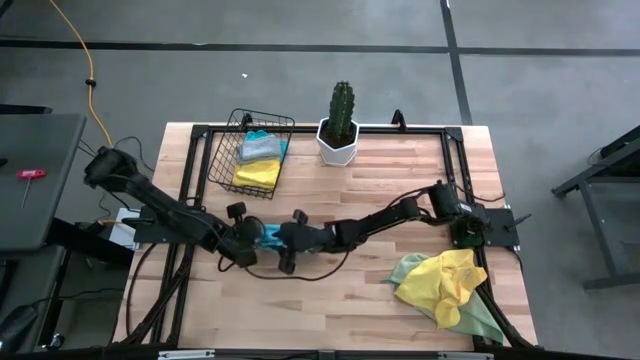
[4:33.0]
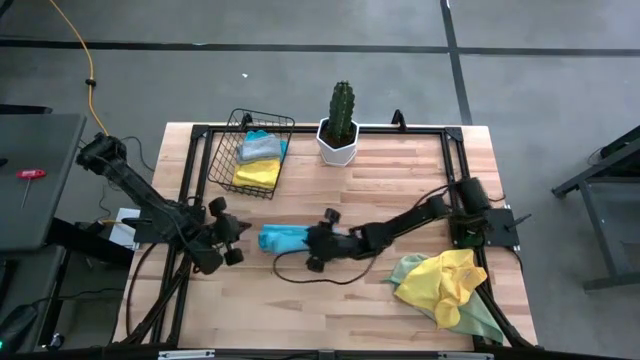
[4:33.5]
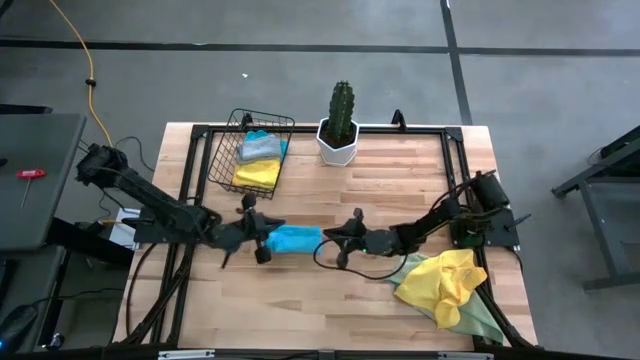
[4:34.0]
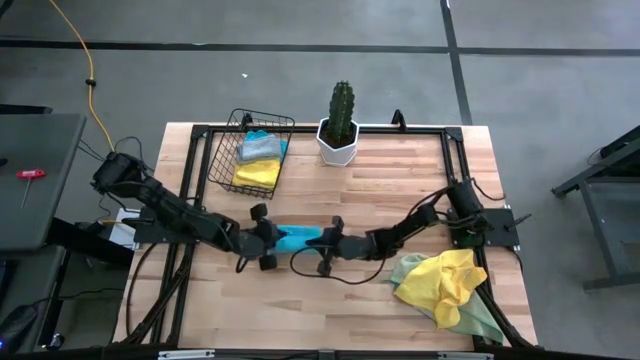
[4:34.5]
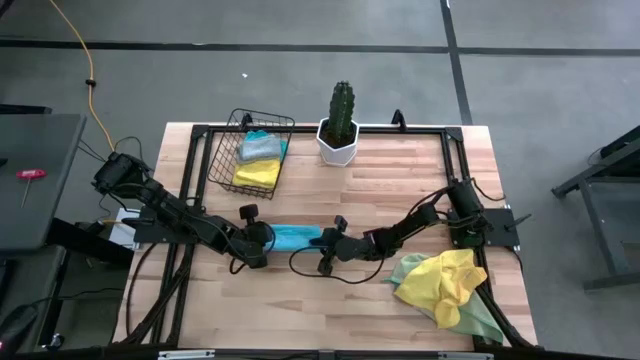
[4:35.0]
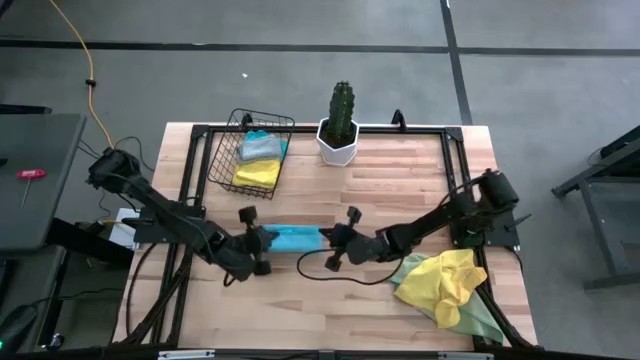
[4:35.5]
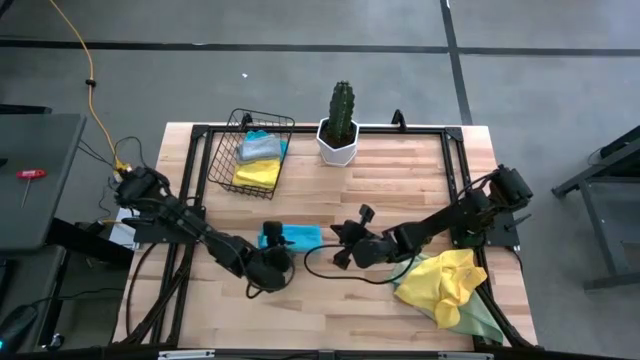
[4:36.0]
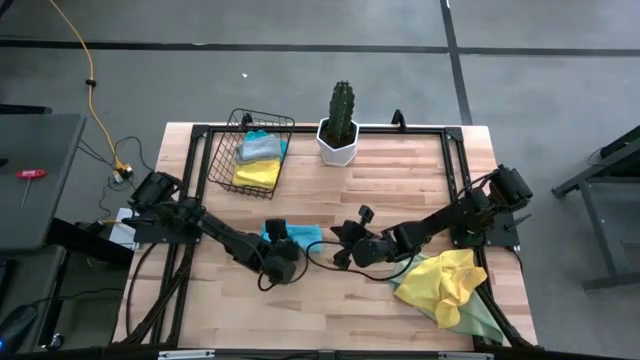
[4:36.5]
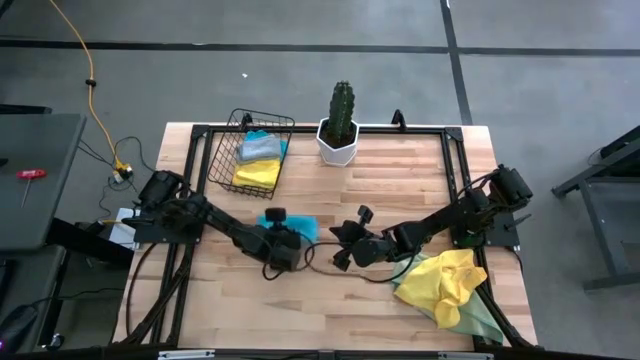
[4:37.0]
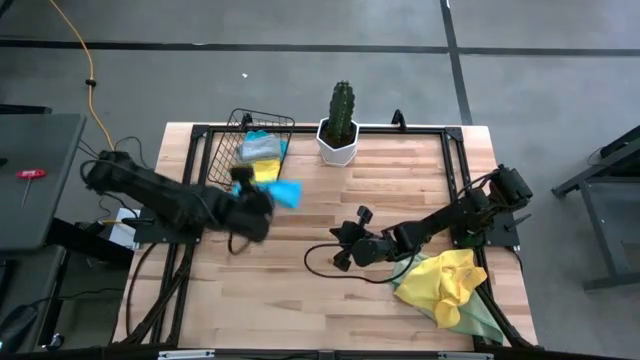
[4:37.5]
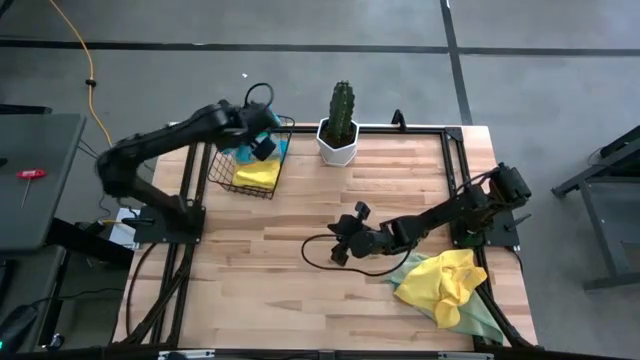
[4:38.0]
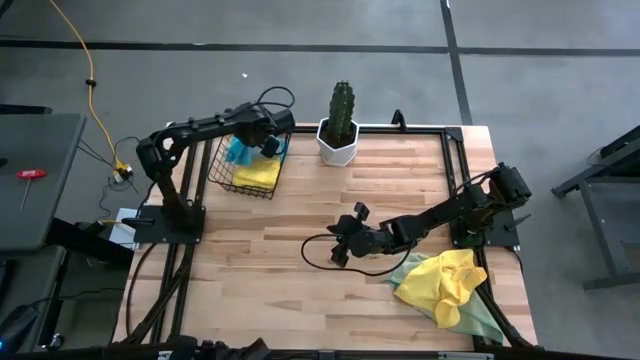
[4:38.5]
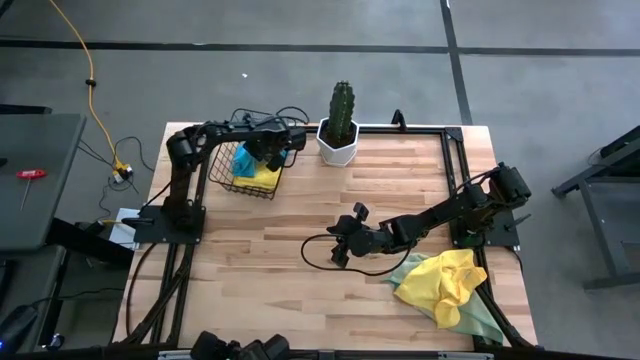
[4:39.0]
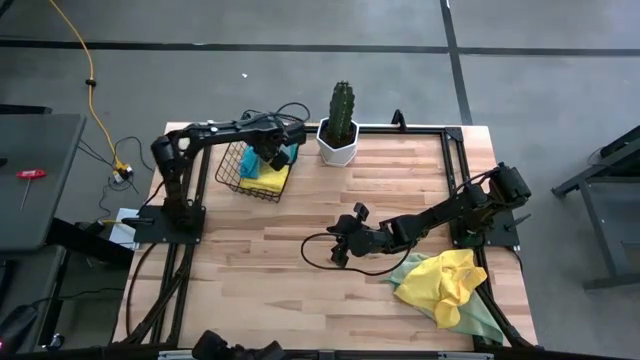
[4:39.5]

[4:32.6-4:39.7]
Task: Fold microfiber towels
Put the folded blue microfiber towel into the mesh basket

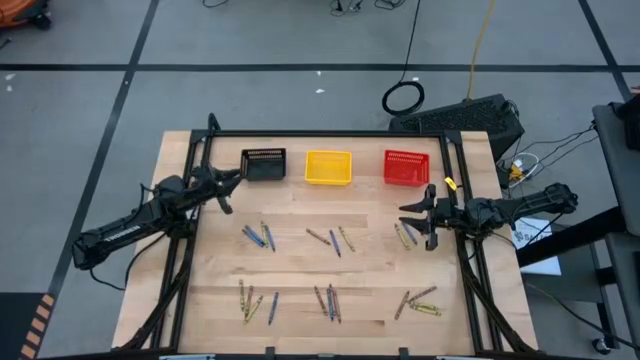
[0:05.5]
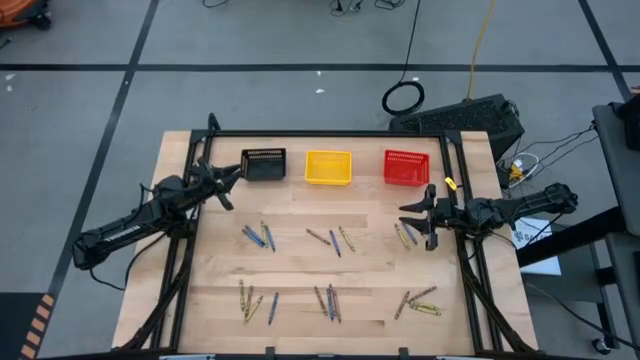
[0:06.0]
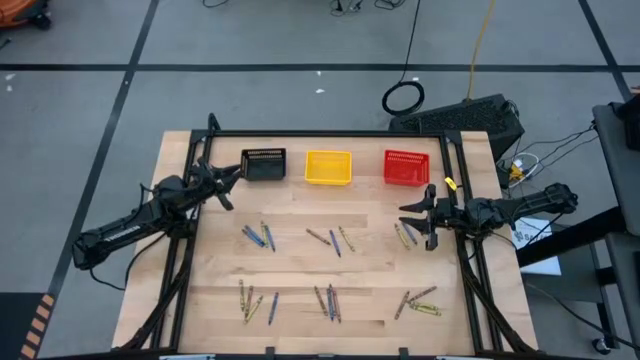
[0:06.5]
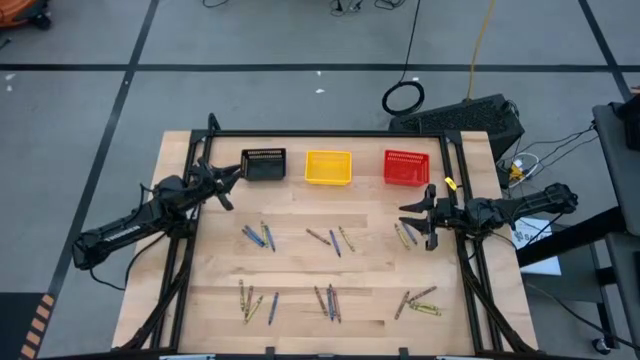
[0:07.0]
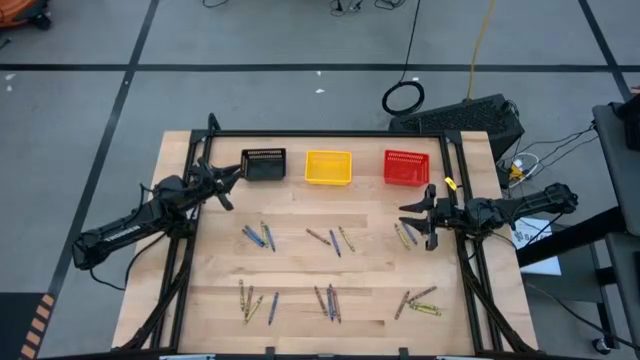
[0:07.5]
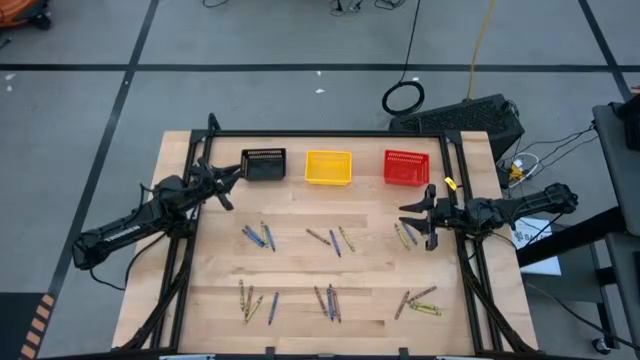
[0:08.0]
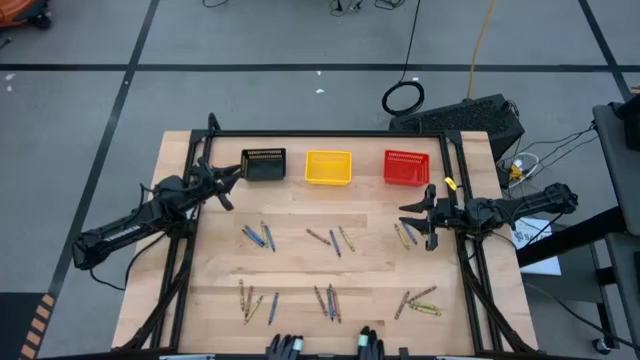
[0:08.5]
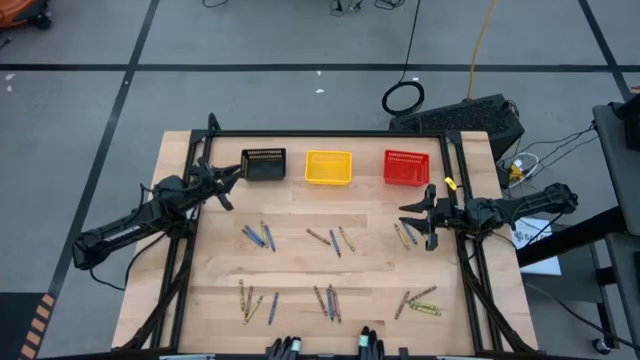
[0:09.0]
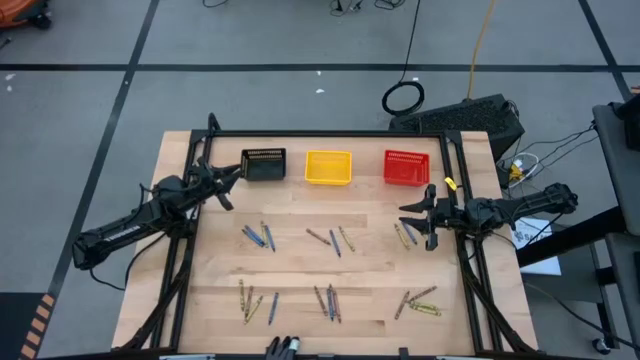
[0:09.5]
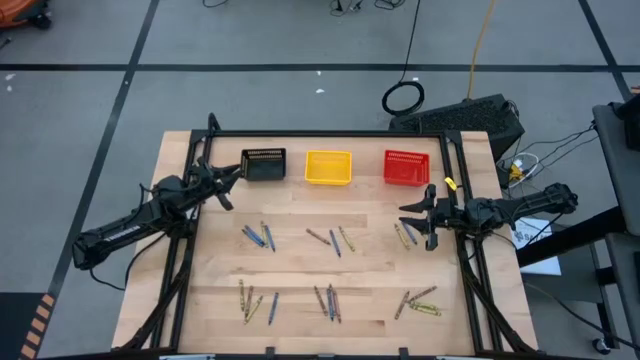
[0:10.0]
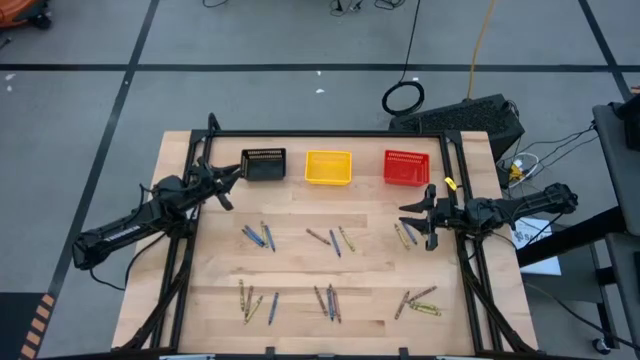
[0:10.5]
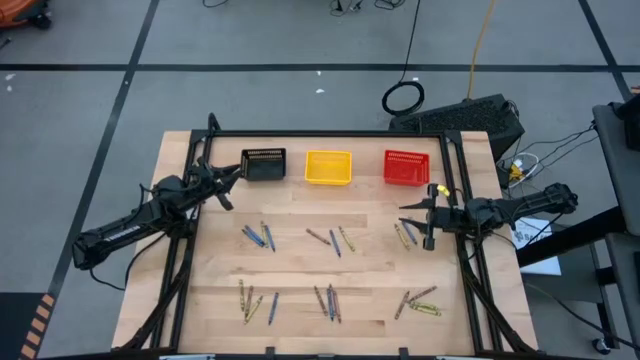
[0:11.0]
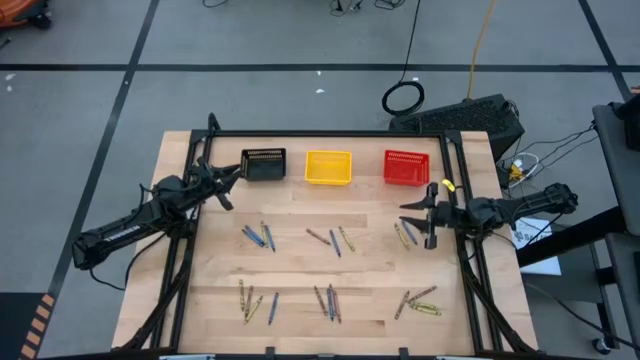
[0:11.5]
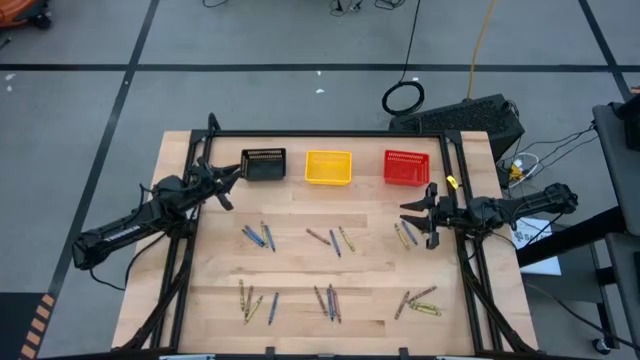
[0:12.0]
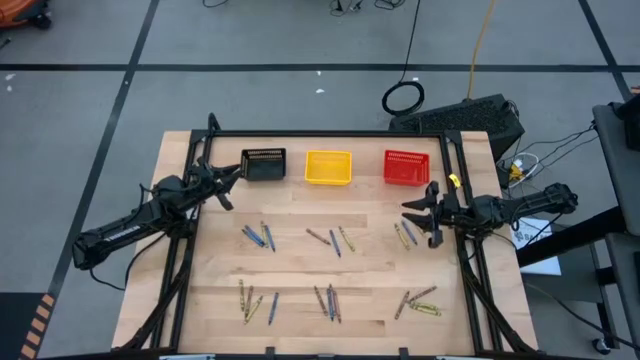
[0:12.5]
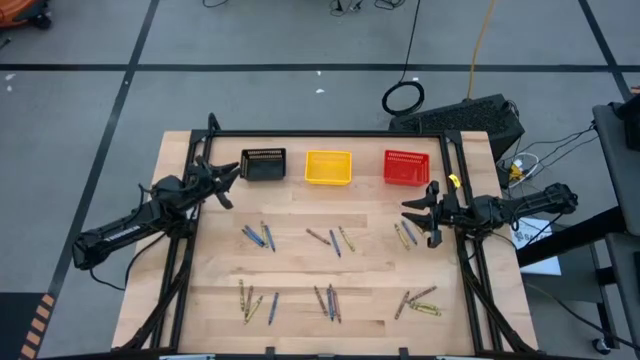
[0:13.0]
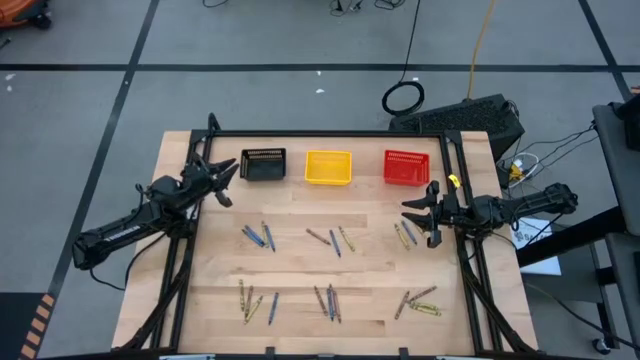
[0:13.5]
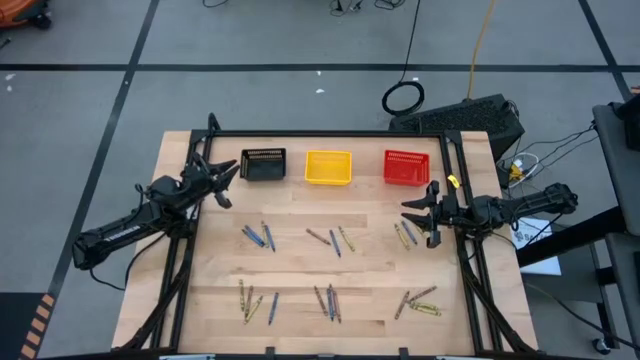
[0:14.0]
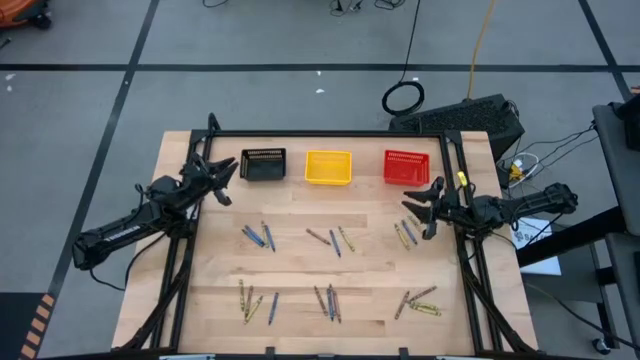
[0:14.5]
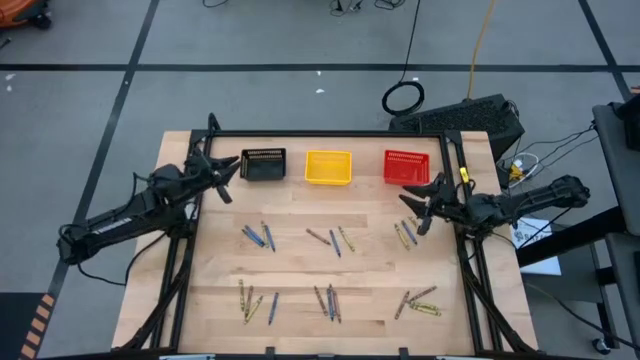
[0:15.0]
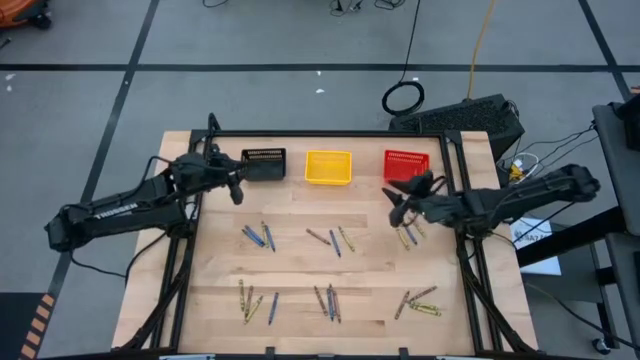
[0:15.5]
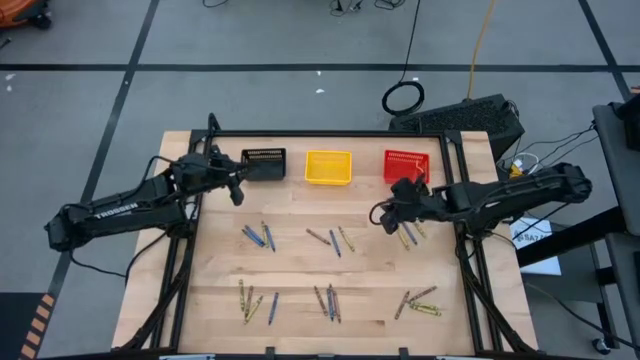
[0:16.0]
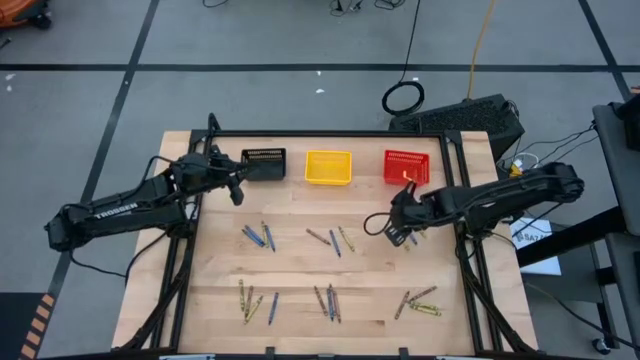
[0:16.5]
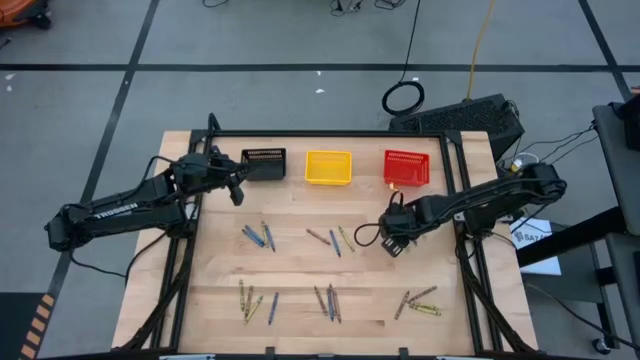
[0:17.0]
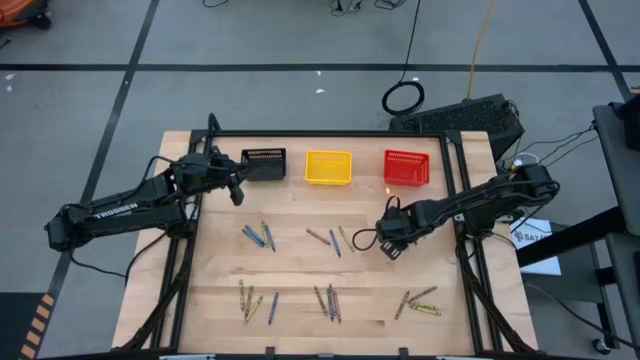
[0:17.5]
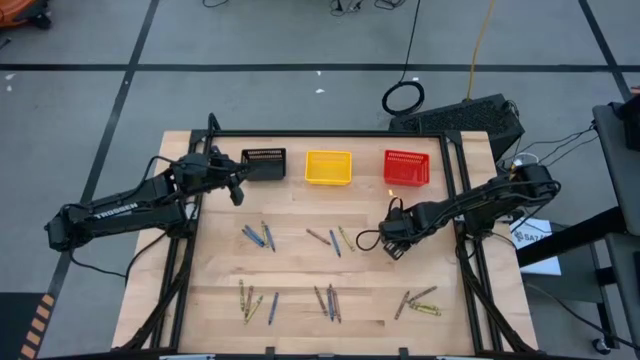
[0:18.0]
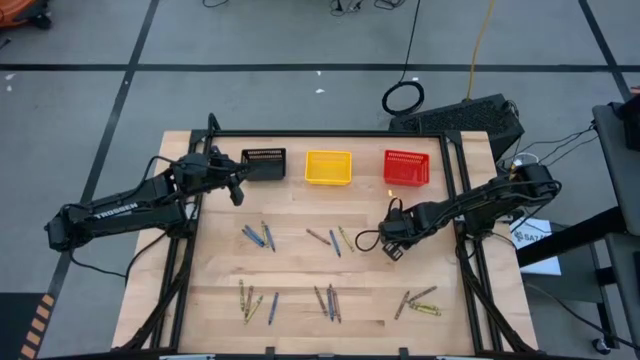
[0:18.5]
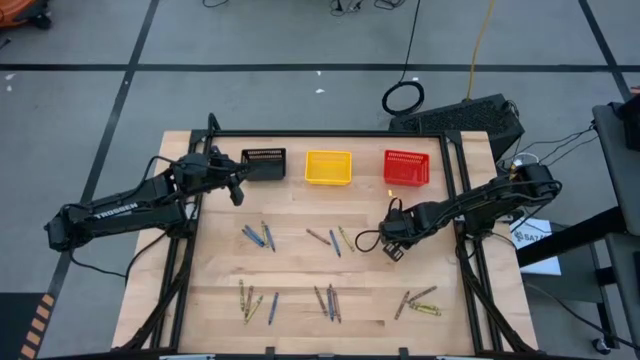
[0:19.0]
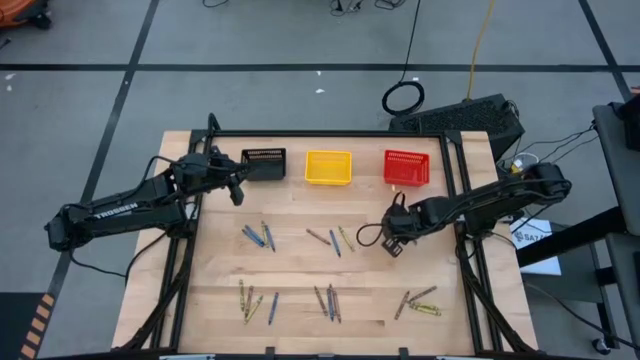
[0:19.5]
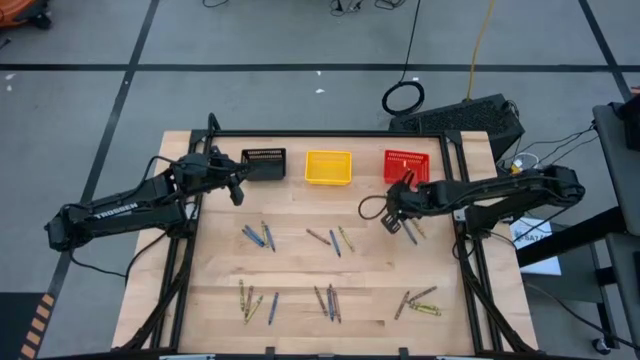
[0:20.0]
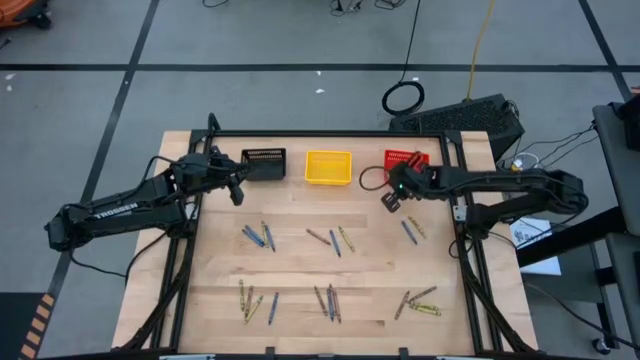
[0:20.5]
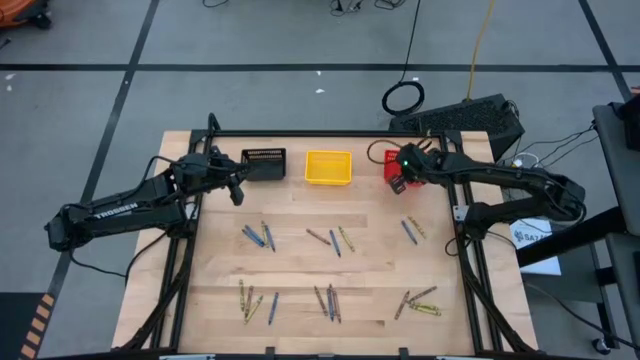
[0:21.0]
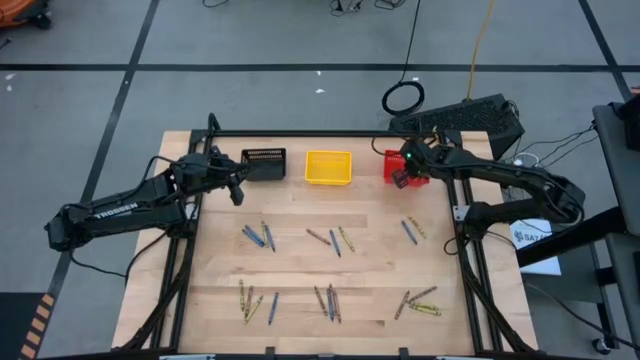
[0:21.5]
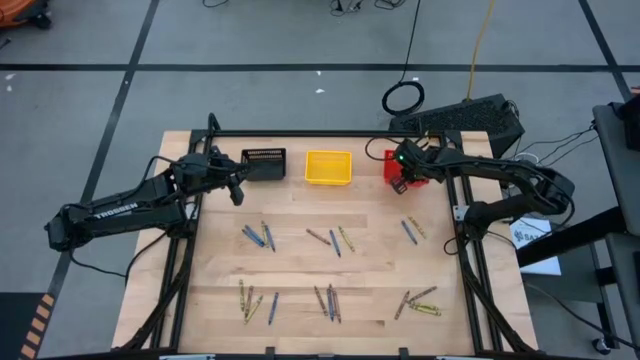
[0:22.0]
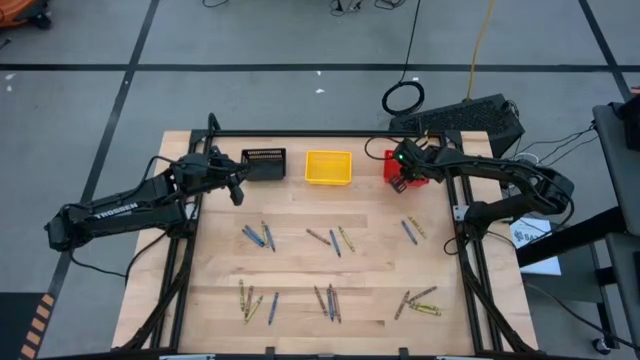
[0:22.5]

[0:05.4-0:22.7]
Task: Sort crayons
Put the green crayon into the red bin
